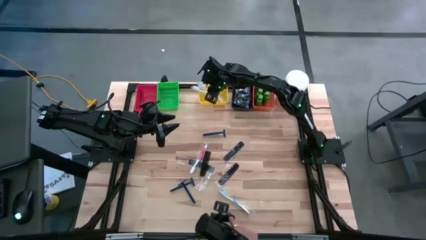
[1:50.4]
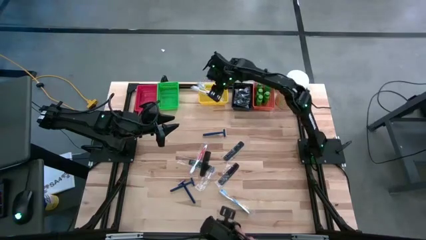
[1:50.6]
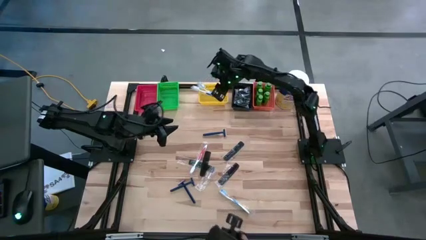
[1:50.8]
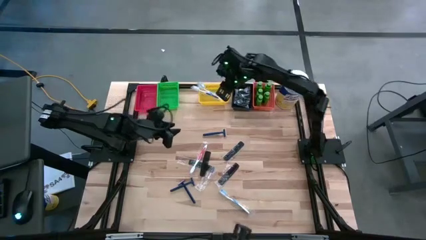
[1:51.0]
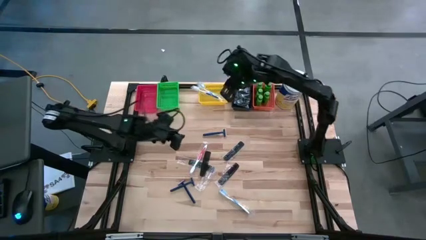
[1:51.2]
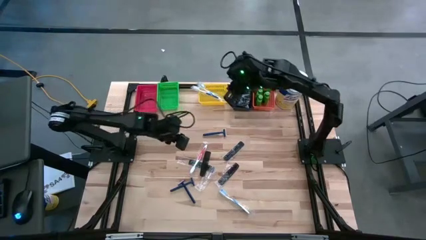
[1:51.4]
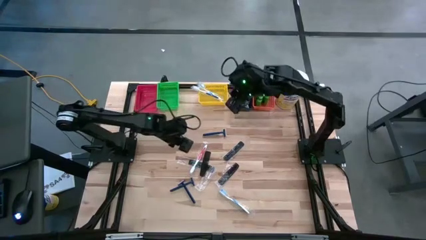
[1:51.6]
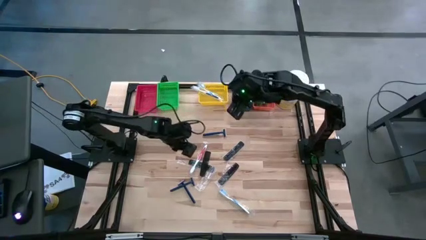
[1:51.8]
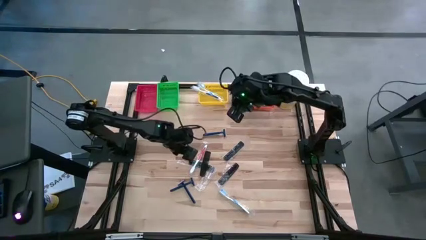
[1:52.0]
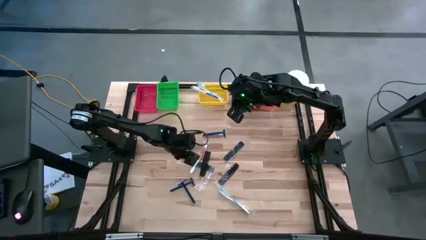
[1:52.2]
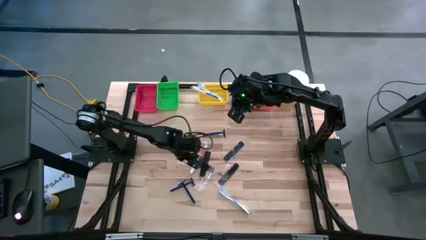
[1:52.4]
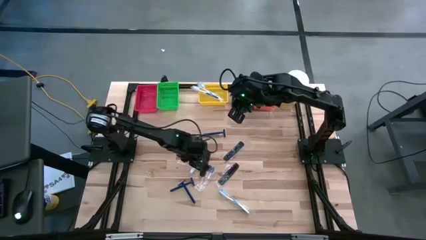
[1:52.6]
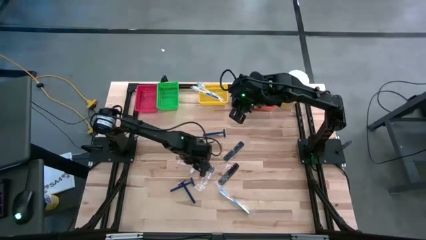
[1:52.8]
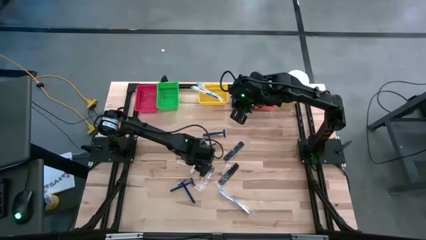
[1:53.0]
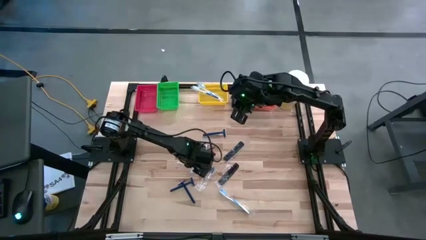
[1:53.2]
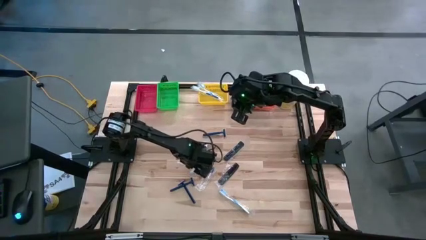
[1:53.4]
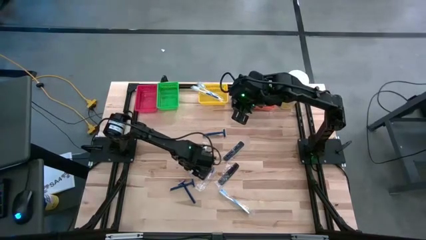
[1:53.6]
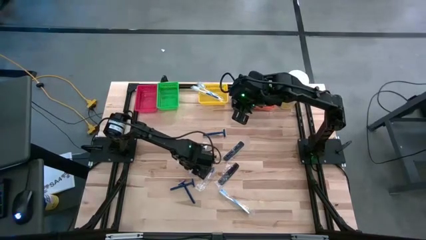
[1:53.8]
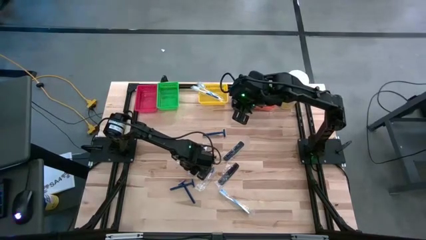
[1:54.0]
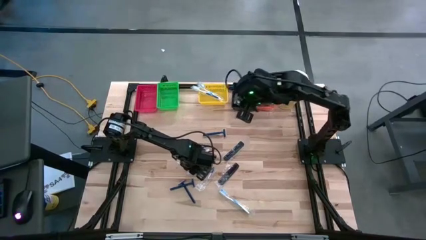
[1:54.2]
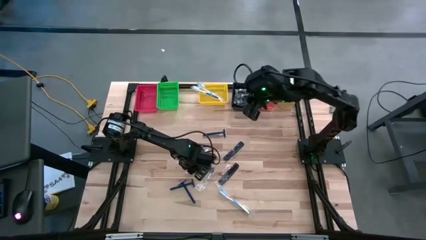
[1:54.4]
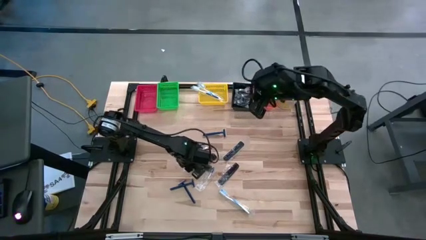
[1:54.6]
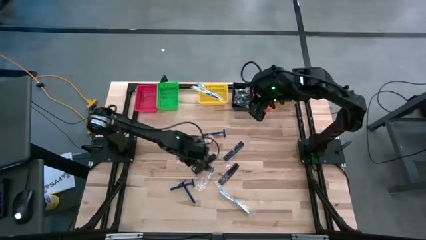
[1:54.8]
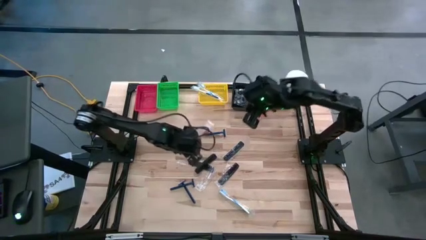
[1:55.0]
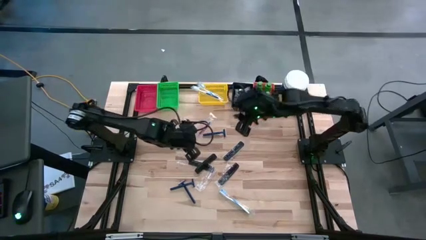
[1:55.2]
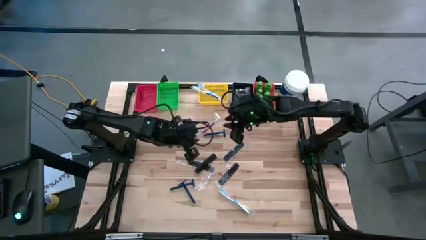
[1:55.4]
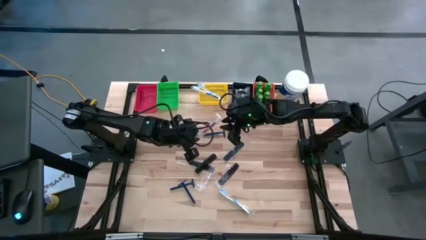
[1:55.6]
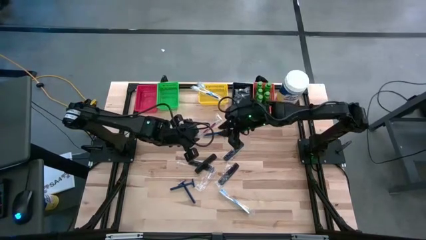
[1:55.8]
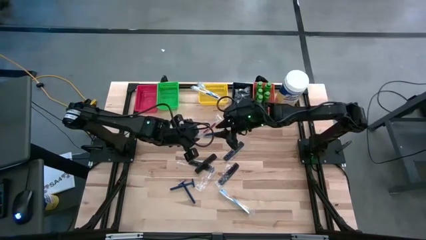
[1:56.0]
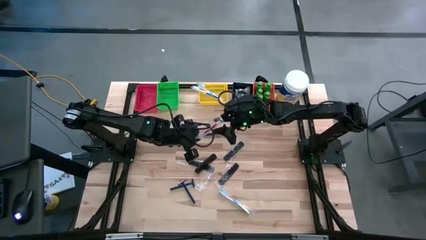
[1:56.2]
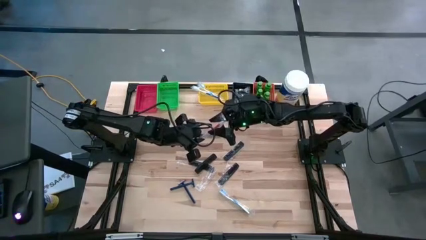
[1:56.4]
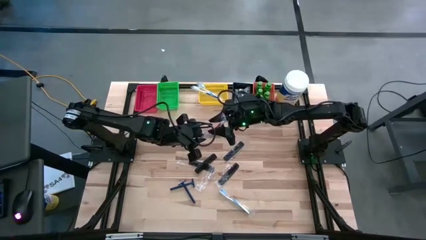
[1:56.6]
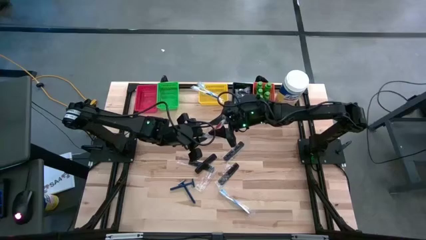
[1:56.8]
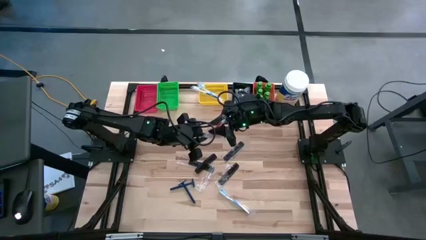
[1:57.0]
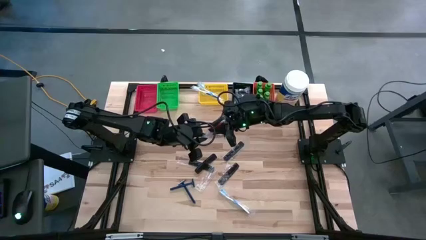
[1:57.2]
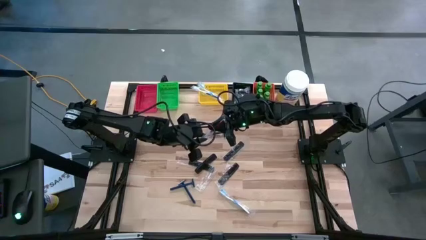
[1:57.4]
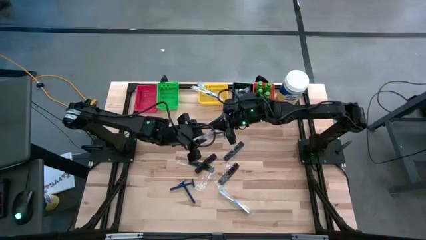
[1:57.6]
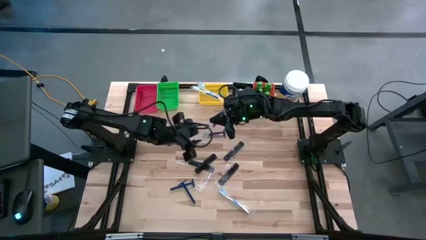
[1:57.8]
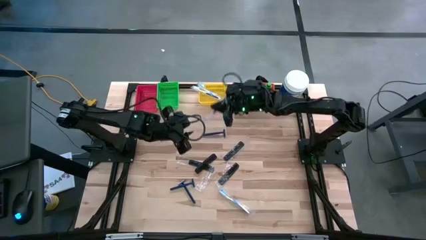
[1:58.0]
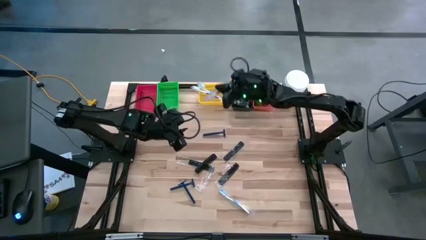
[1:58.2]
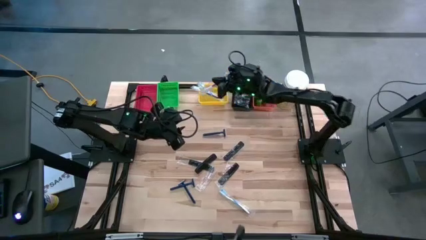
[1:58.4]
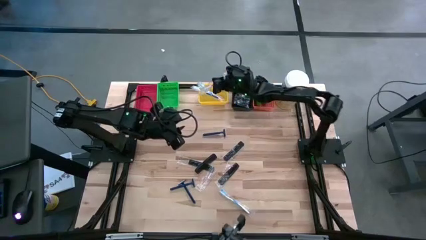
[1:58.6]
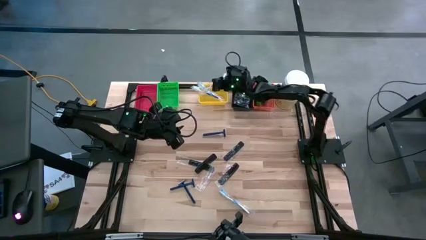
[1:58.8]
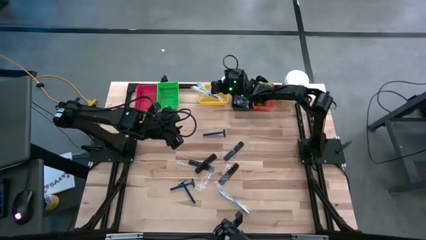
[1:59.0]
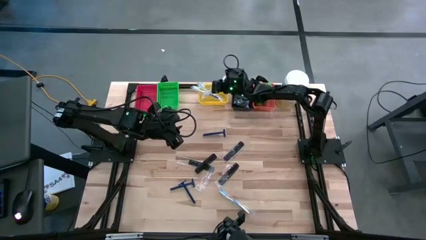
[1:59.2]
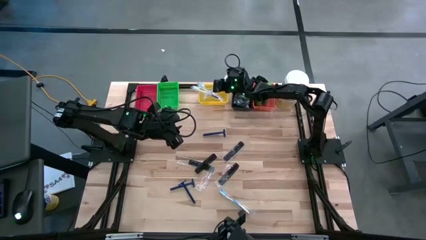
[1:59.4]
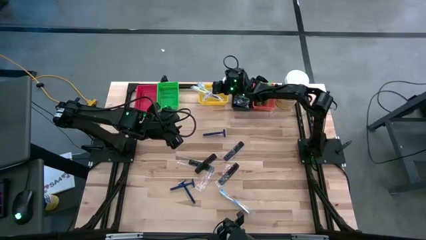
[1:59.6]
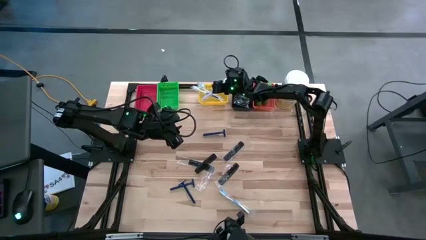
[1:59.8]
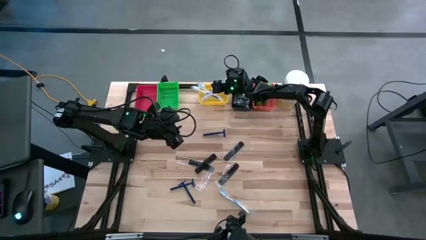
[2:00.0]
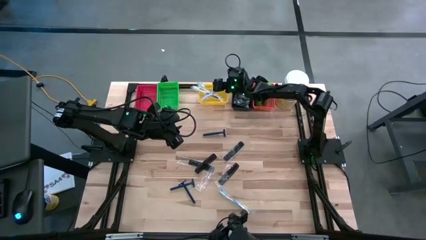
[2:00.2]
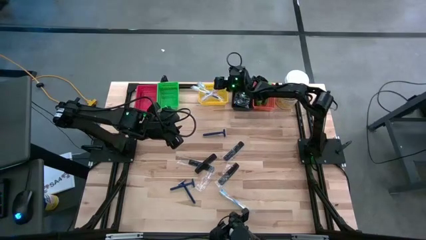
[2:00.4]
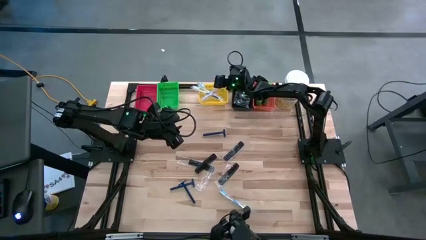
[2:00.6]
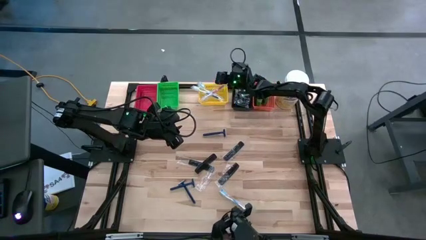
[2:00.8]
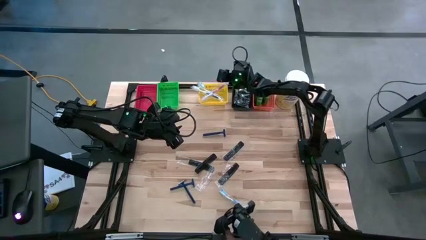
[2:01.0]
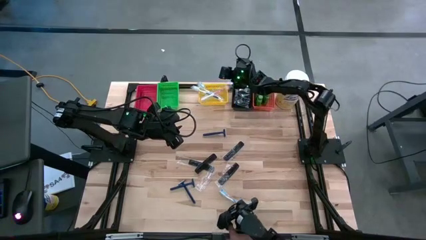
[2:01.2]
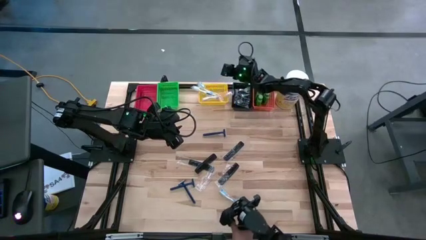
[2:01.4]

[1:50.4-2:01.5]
Task: Pick & Place Travel size toiletries
Put the orange toothbrush into the yellow bin

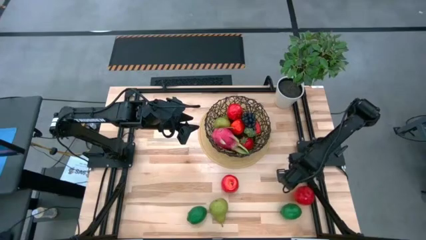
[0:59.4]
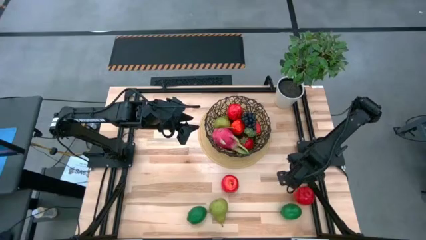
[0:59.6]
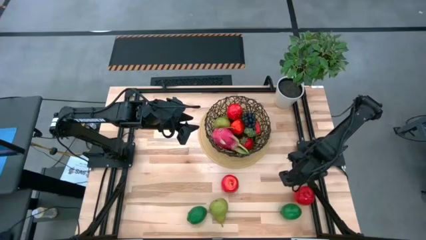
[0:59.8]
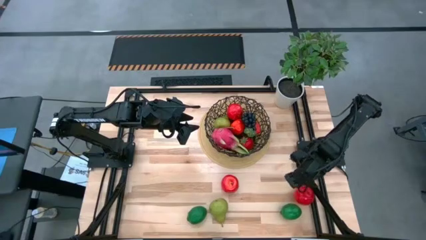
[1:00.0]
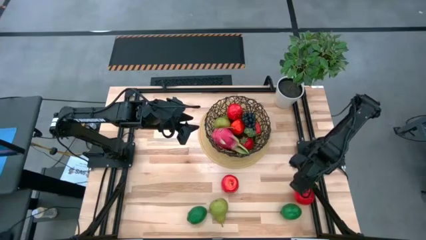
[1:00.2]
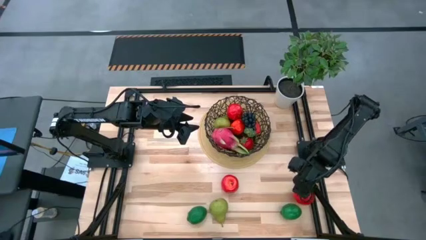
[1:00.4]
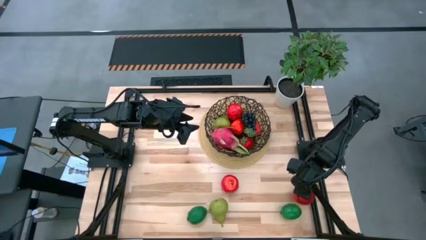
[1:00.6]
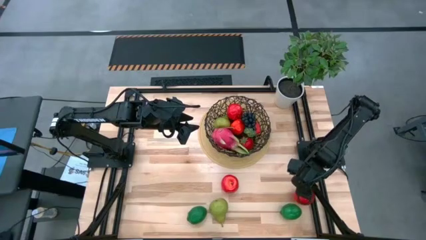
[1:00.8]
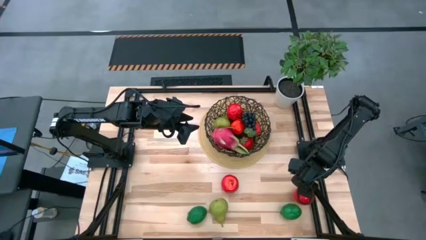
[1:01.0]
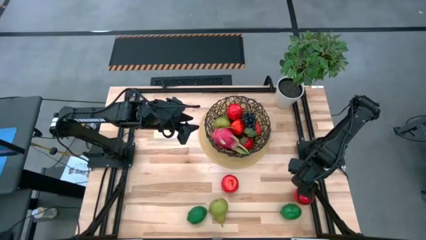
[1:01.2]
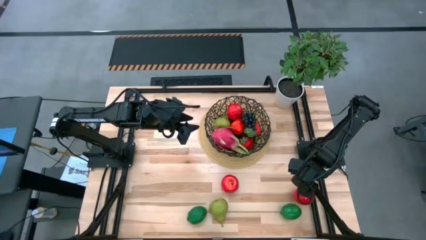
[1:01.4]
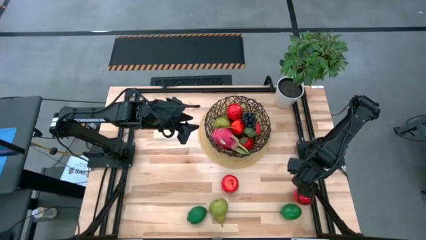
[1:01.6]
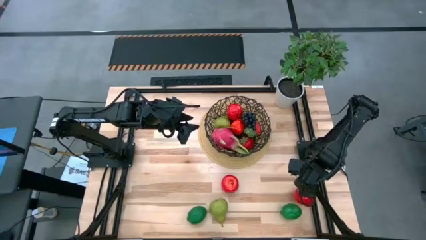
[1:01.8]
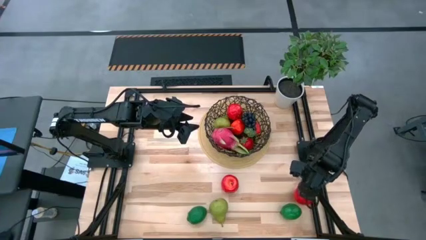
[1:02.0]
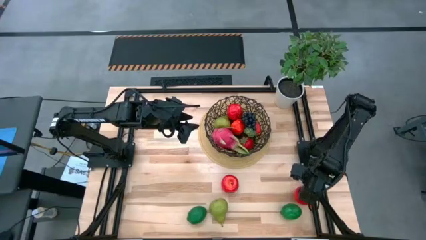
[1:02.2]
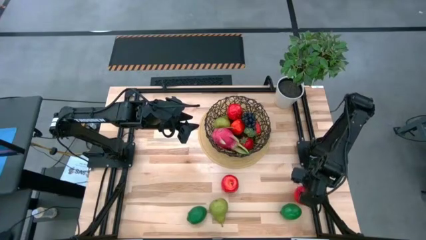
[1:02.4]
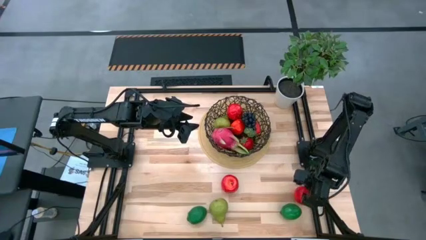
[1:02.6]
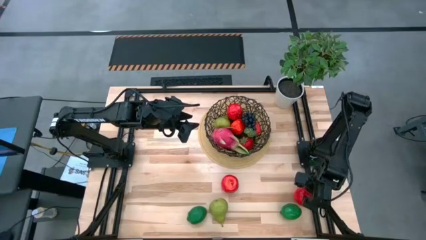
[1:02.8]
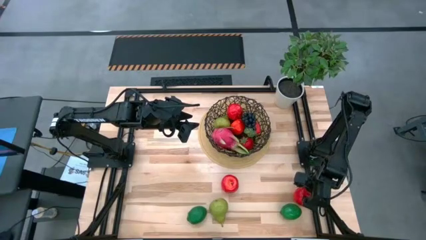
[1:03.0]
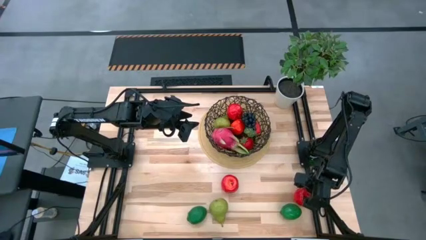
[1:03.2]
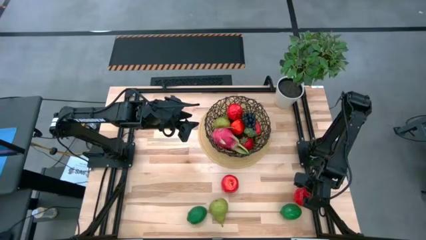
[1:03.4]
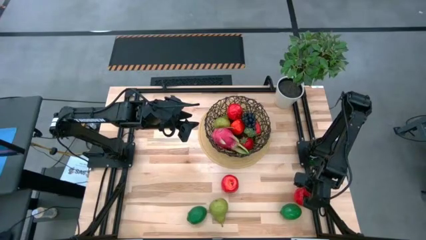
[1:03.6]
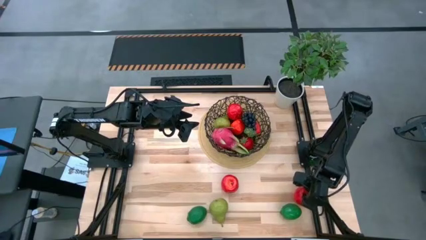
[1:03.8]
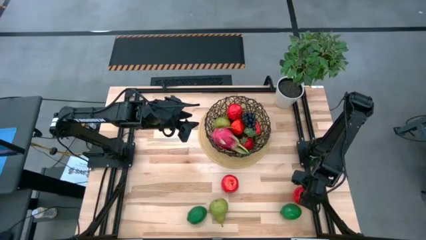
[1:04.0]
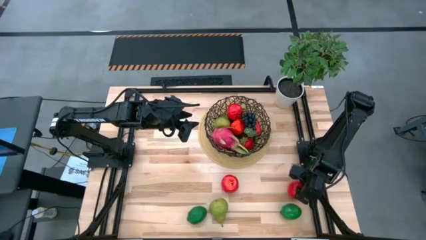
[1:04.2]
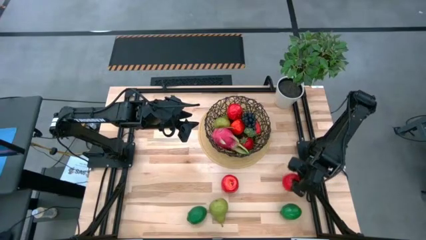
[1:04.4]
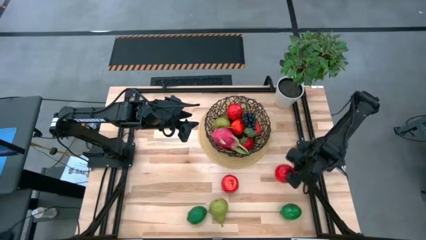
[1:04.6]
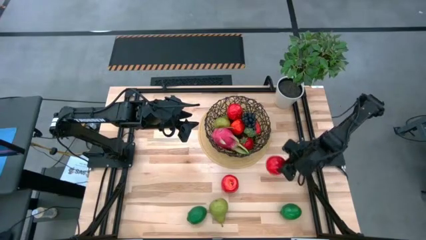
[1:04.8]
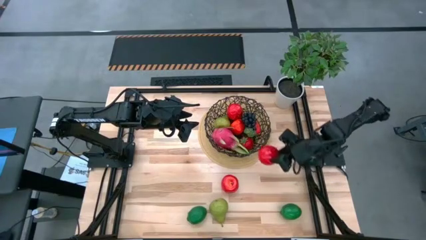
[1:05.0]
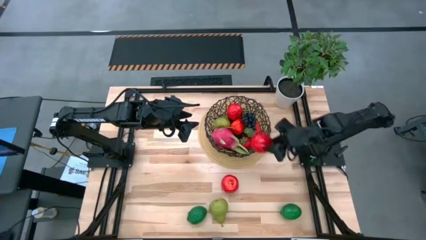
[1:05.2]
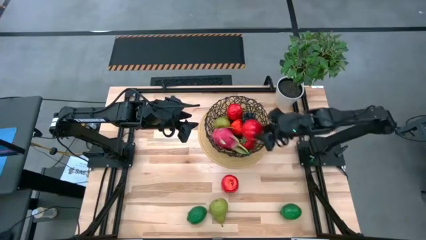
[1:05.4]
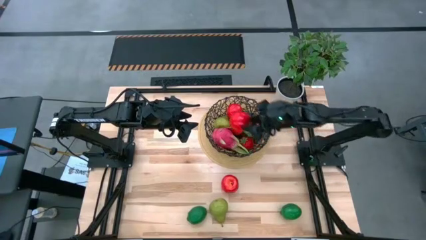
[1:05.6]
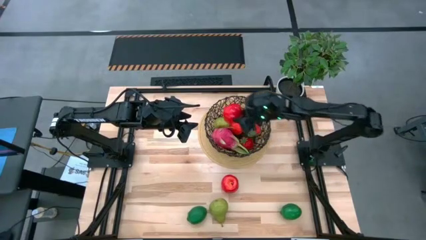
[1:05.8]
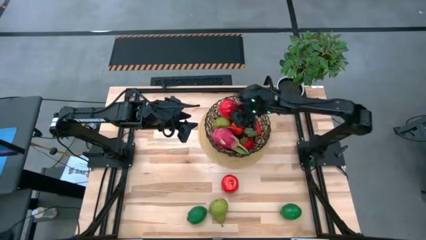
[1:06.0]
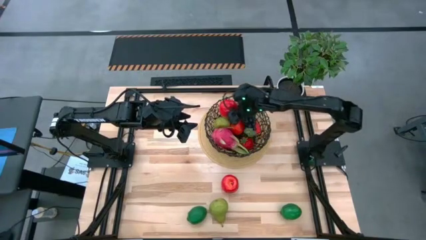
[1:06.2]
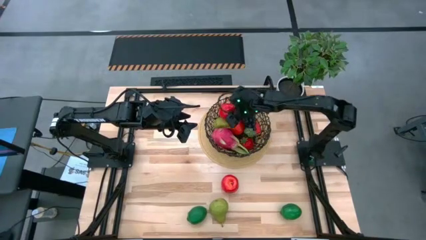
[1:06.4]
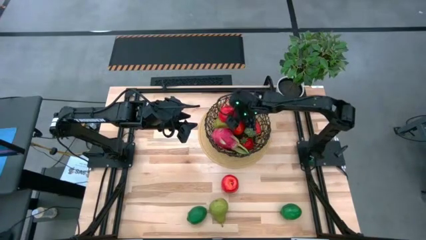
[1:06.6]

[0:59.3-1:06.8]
Task: Build produce basket
Put the red apple into the black basket
